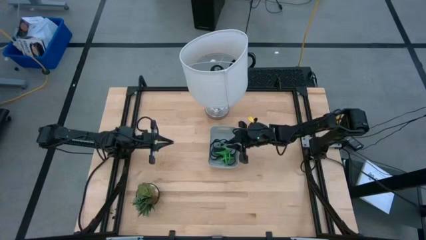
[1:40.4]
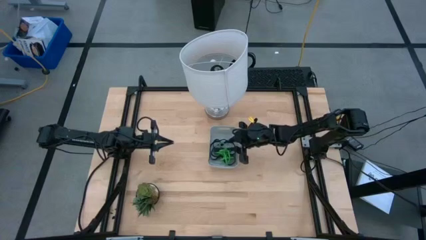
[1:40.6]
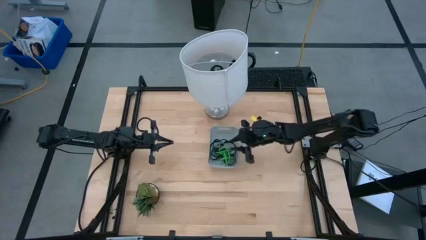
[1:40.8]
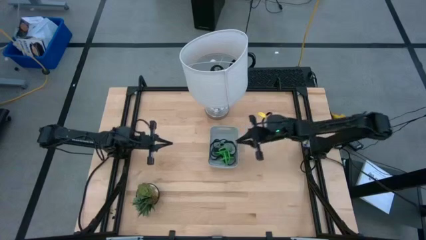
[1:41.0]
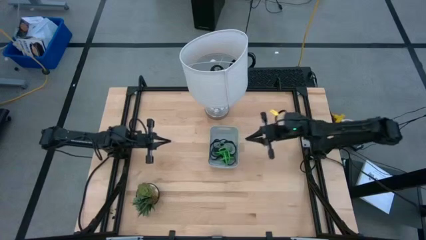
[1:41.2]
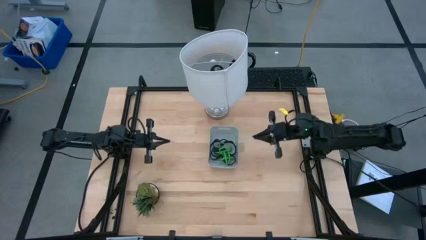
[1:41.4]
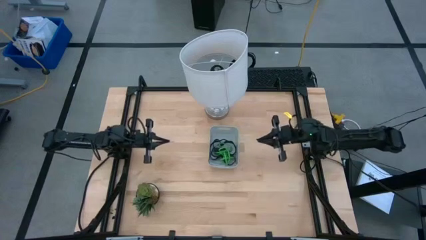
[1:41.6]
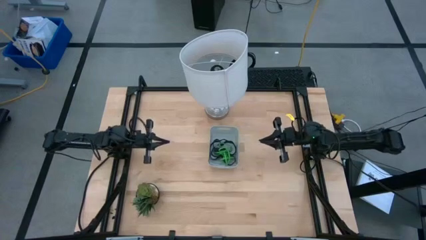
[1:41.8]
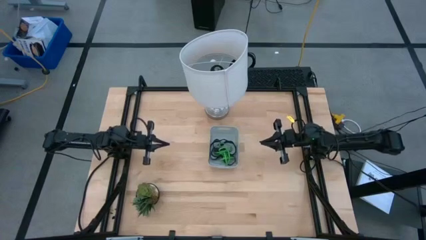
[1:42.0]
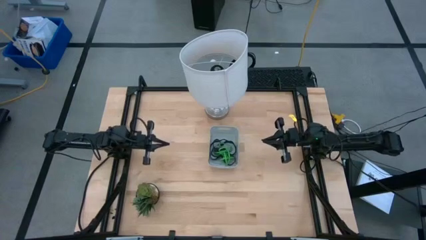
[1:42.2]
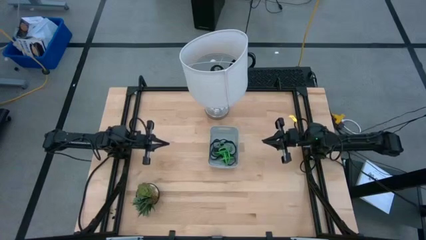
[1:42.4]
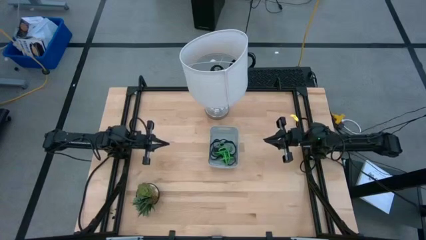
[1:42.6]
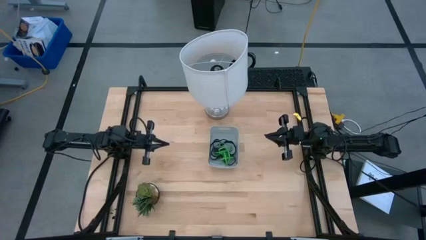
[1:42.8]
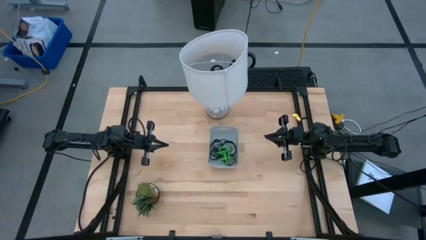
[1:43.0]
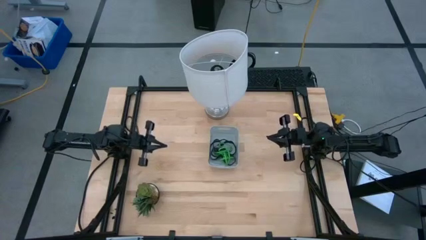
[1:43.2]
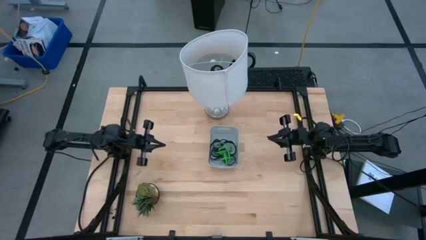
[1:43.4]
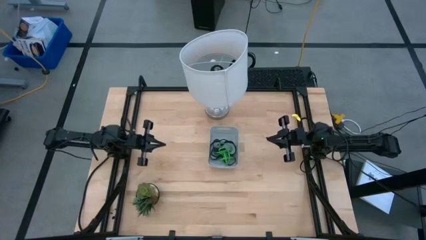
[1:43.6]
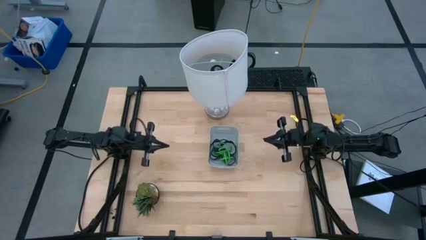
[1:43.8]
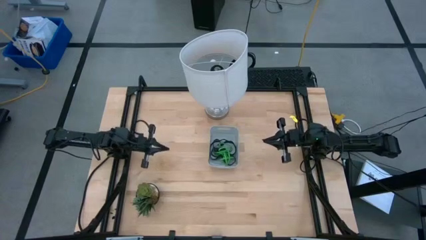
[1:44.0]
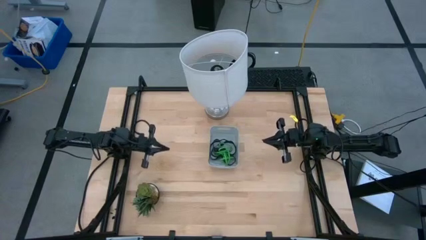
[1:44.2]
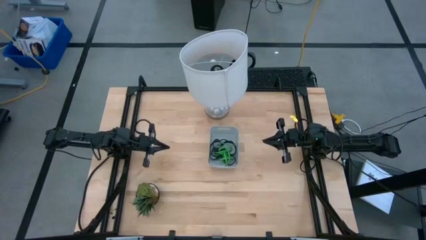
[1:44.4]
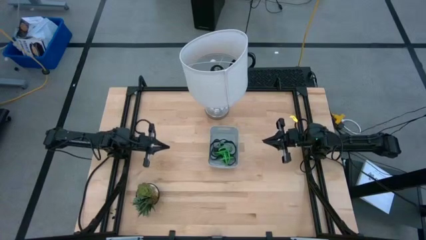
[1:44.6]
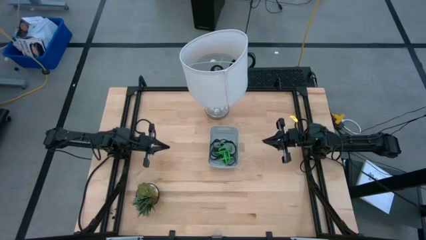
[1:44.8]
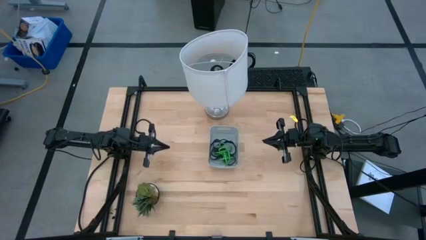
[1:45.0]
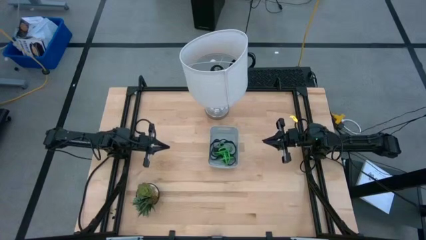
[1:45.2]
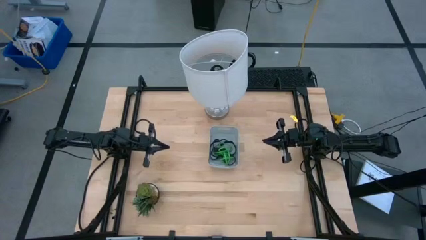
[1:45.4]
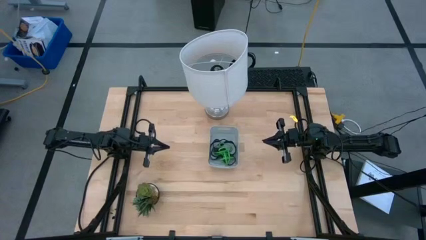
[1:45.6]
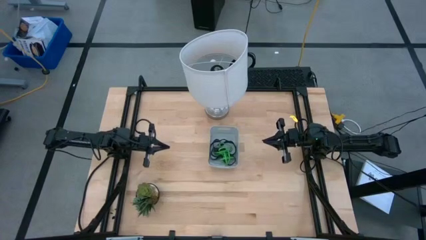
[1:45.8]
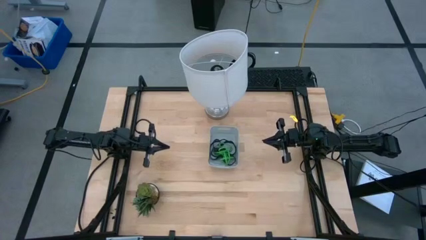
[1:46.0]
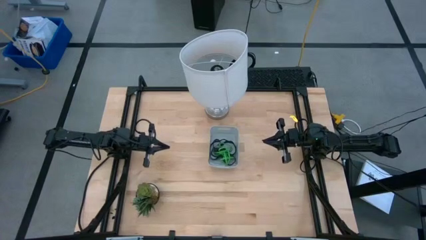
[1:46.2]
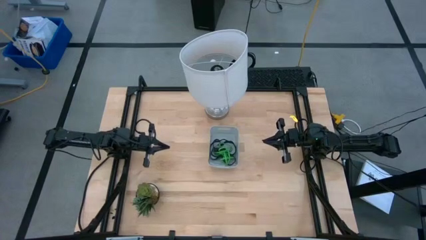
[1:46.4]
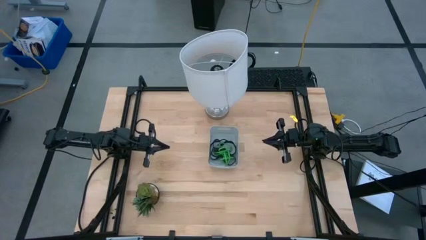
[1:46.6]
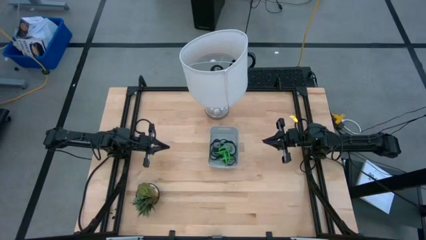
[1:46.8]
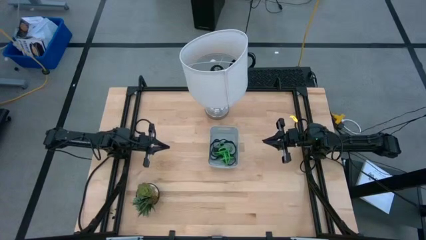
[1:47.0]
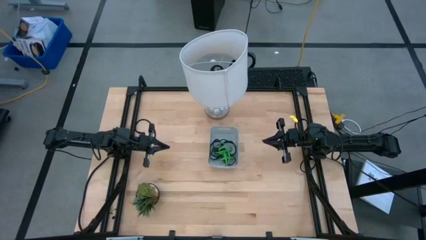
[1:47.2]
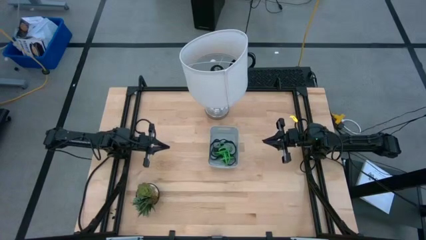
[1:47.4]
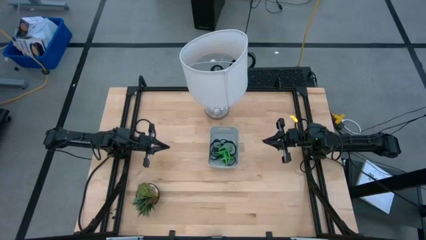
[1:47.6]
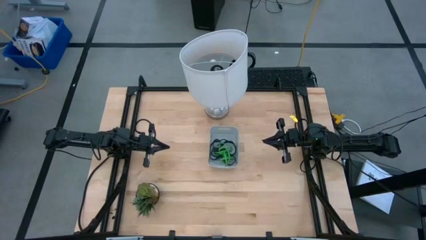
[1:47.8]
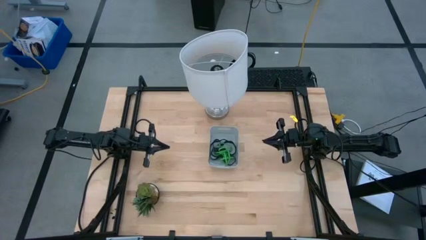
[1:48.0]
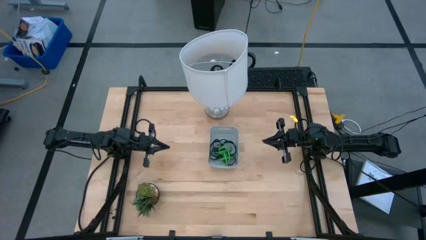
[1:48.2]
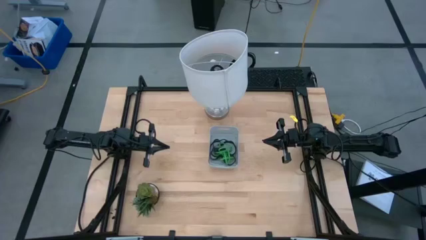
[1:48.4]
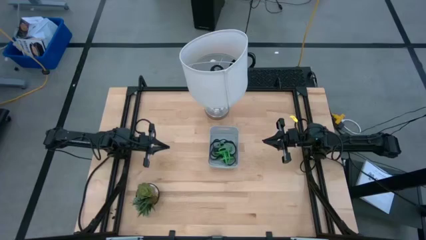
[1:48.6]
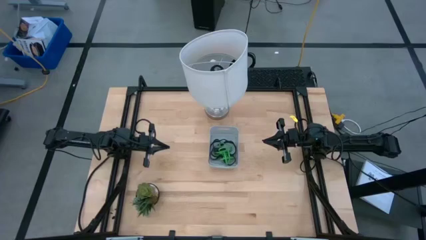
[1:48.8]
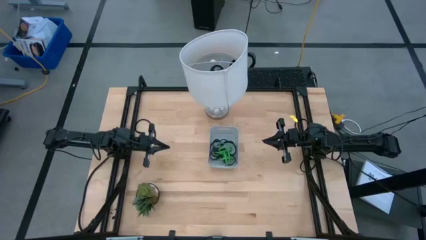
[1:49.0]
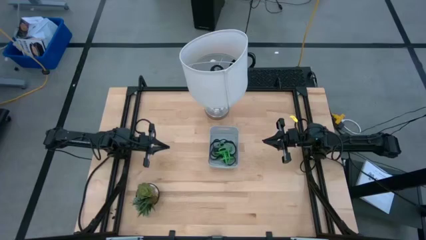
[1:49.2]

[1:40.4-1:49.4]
Task: Pick and place rubber bands into bin
Return to Home Position

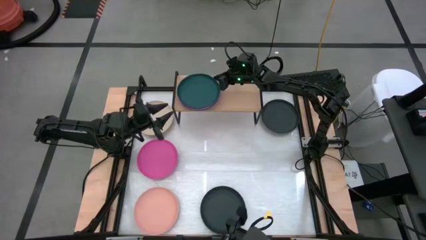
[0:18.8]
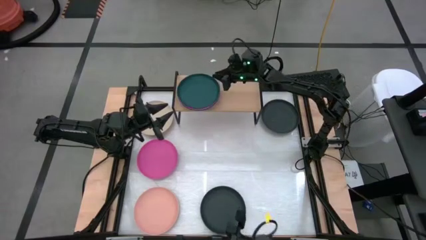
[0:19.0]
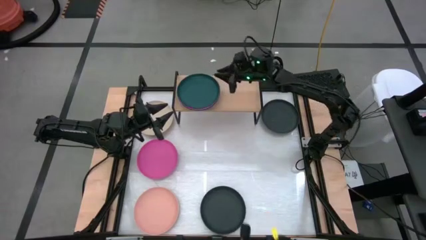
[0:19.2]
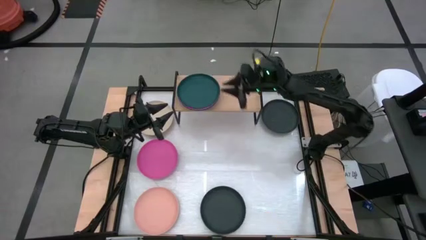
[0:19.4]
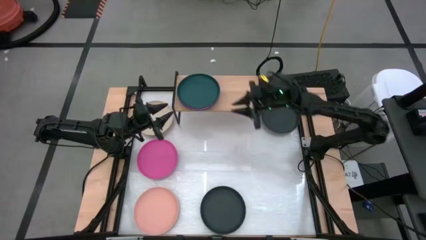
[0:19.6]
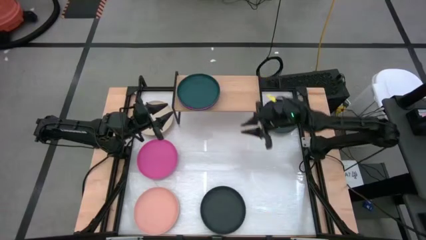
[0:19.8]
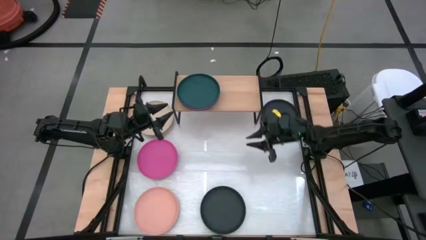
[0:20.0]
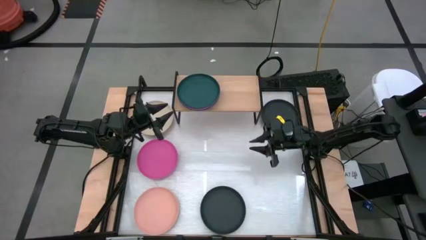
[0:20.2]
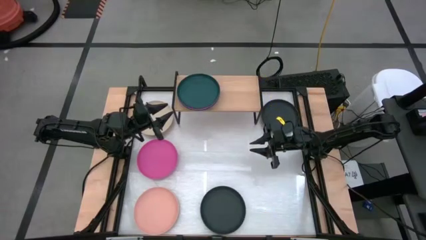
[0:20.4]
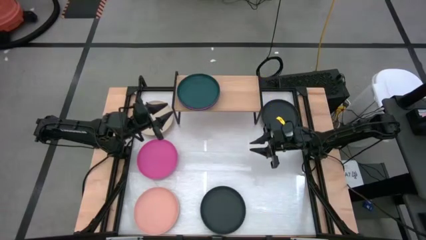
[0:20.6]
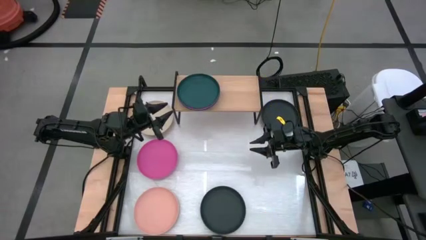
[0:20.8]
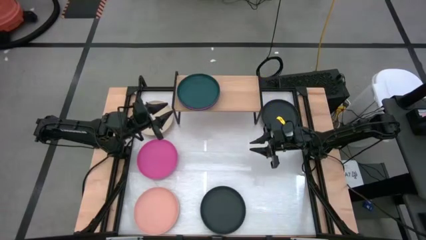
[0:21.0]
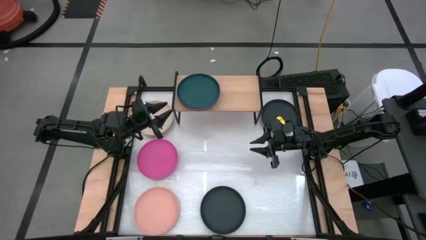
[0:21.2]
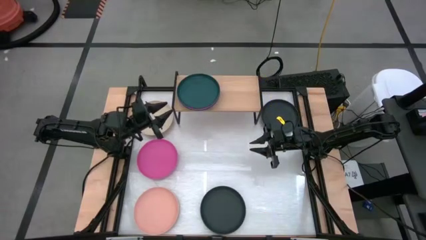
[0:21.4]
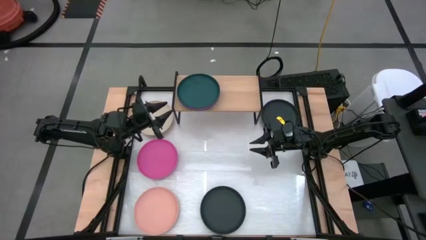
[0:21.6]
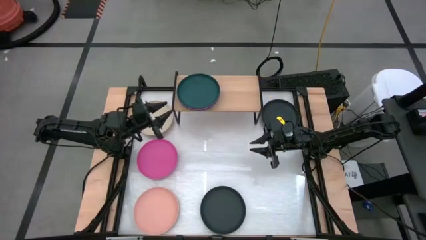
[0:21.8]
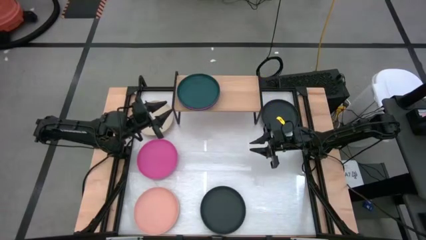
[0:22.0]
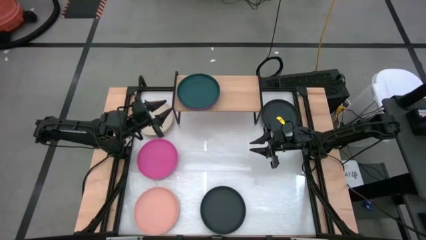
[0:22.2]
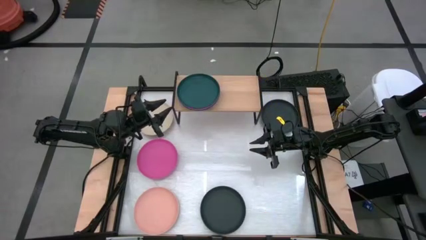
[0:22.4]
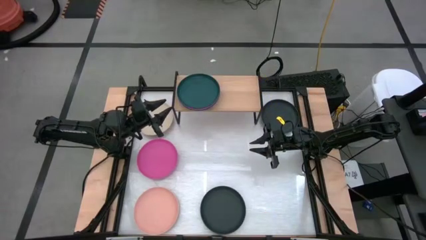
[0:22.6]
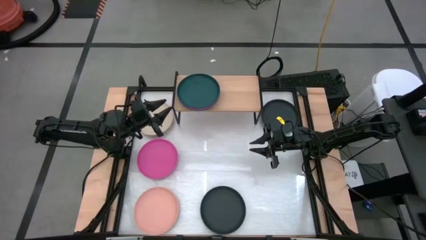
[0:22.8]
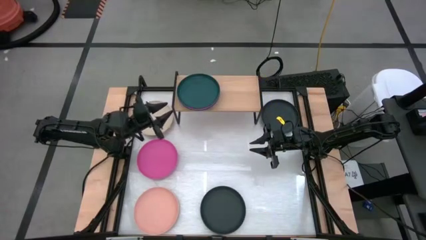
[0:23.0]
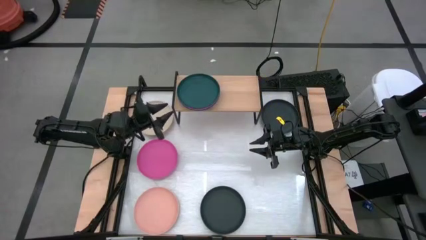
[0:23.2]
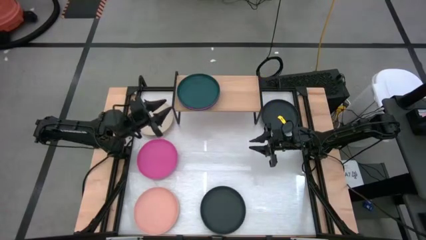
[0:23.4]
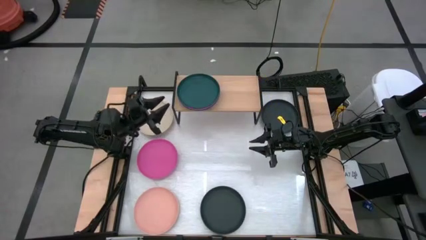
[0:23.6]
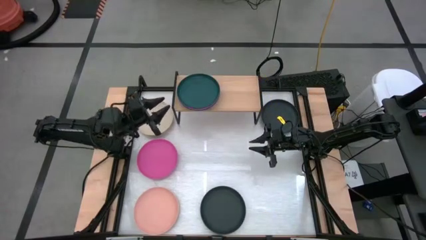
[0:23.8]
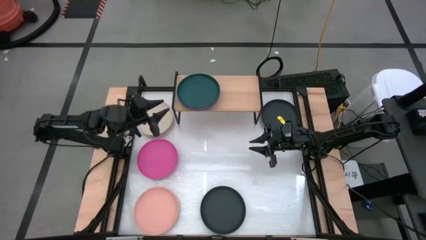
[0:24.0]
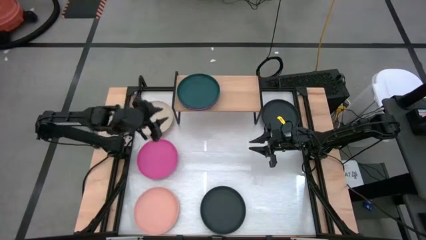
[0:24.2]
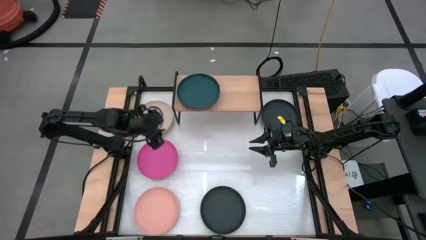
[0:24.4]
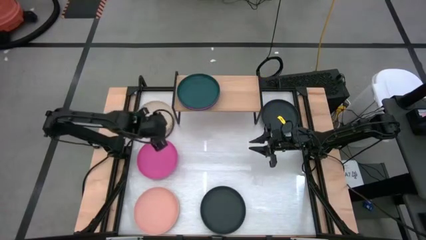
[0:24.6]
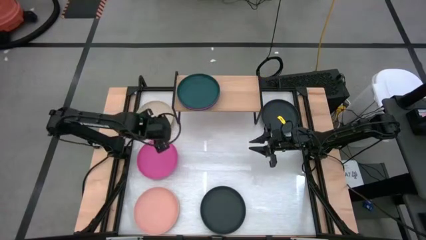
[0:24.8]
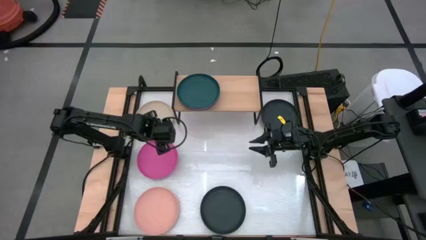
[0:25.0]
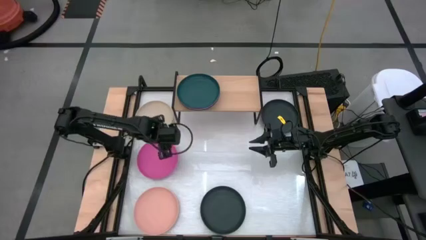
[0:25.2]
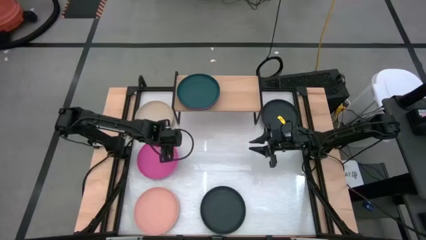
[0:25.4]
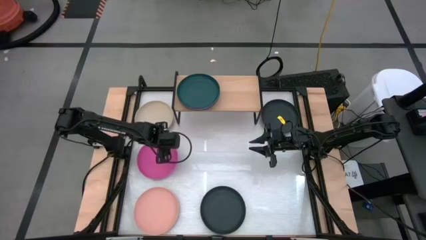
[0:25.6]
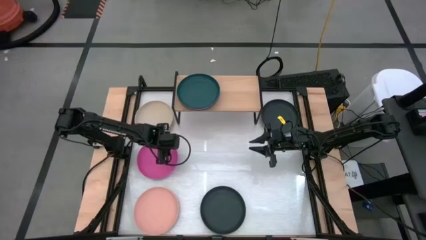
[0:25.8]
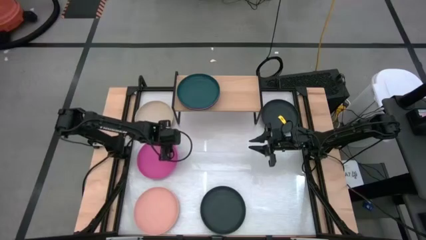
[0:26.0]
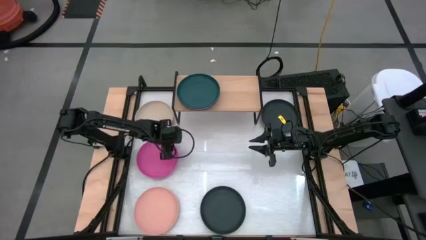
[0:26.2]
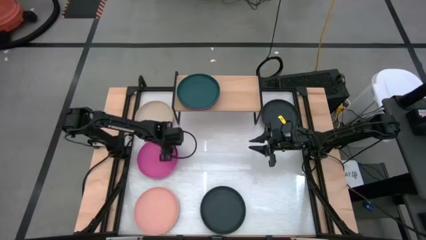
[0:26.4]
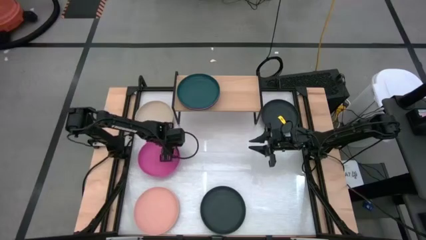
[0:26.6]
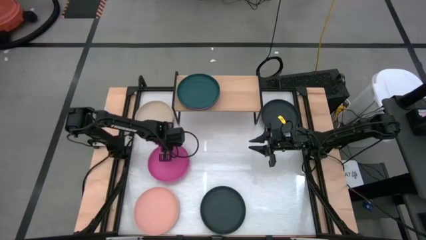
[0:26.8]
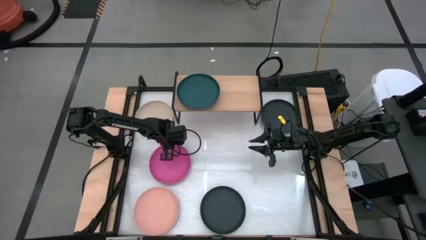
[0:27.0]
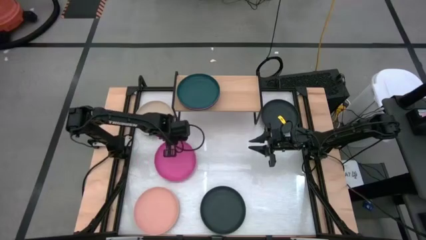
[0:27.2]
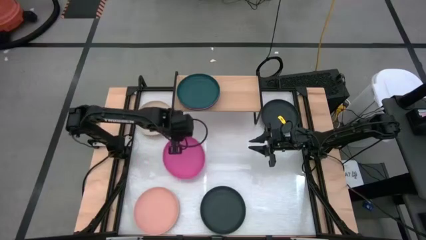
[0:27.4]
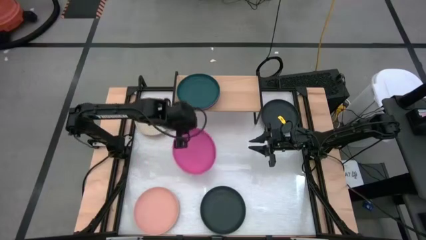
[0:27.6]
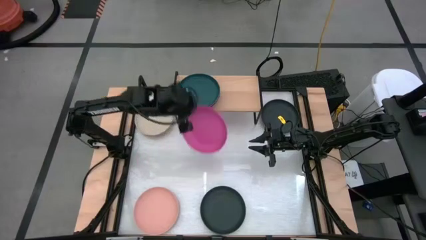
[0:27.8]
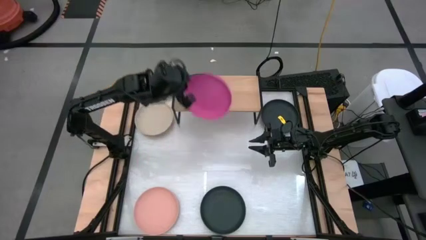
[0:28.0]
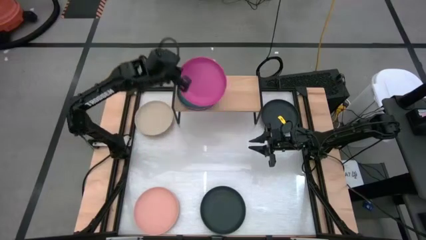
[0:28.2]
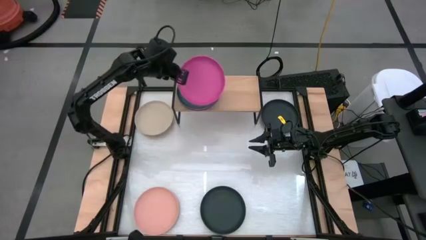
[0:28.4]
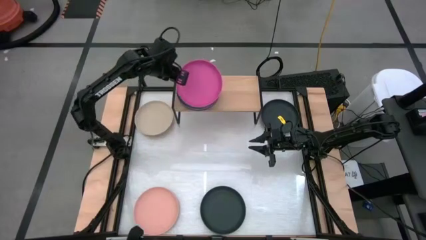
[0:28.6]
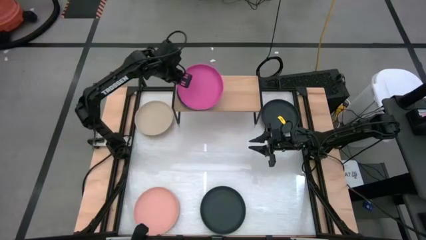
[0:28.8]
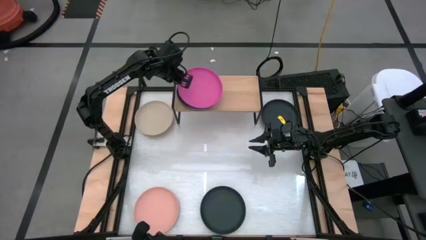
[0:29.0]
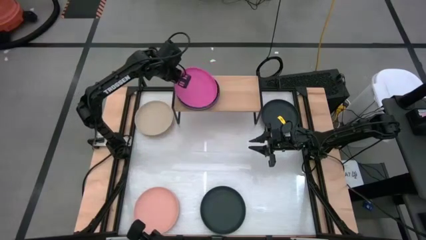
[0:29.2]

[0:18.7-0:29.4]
Task: Place and stack plates onto a shelf
Stack the pink plate on top of the dark green plate on the shelf
